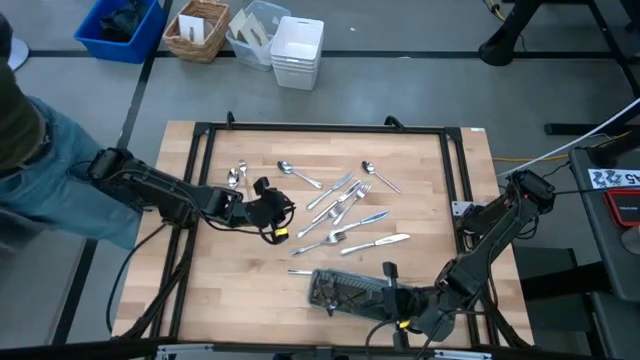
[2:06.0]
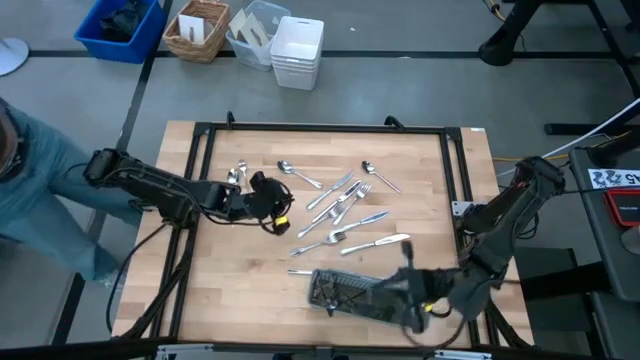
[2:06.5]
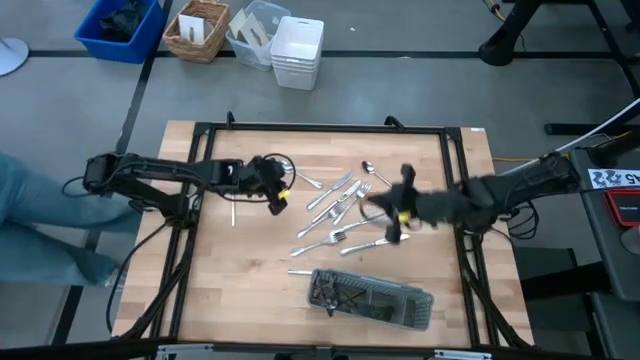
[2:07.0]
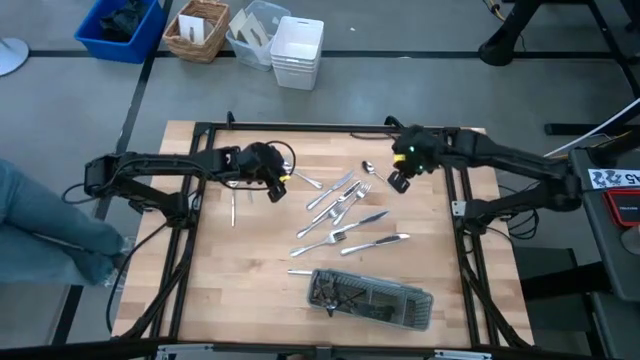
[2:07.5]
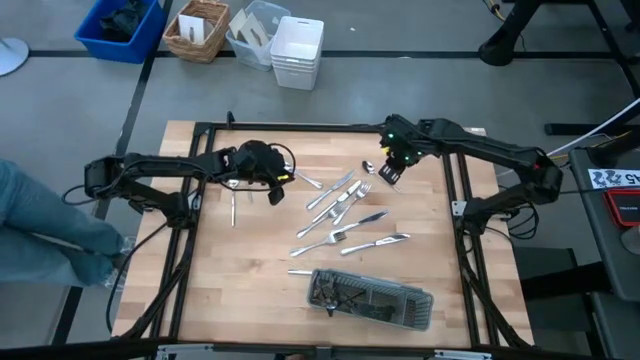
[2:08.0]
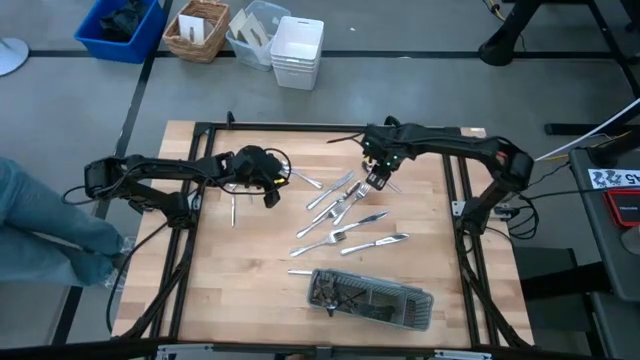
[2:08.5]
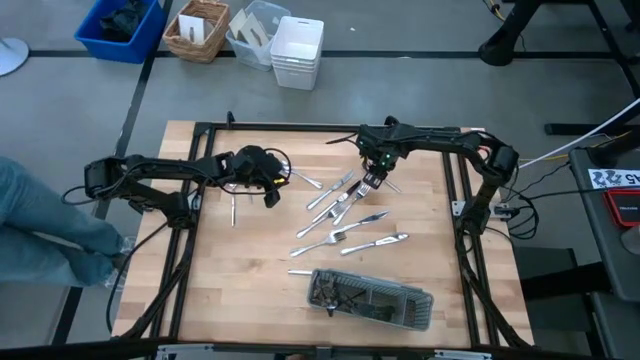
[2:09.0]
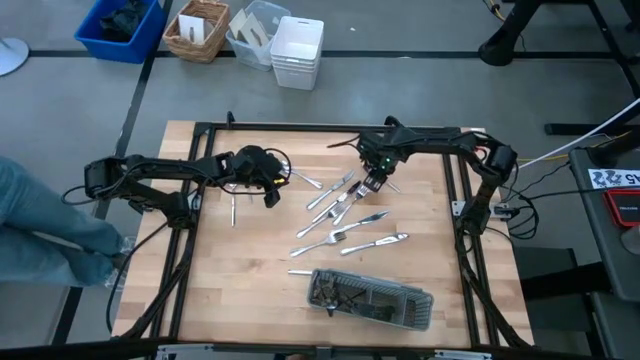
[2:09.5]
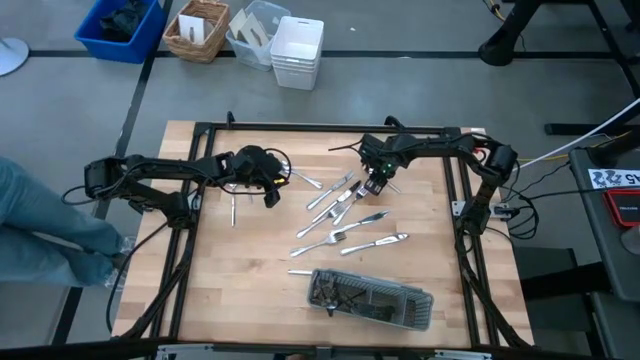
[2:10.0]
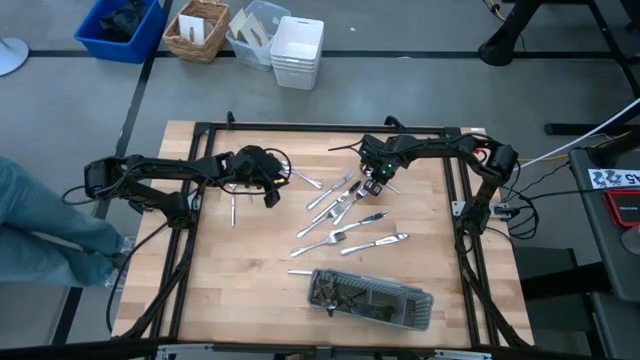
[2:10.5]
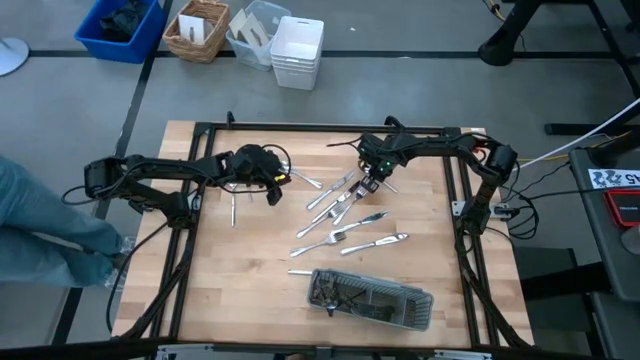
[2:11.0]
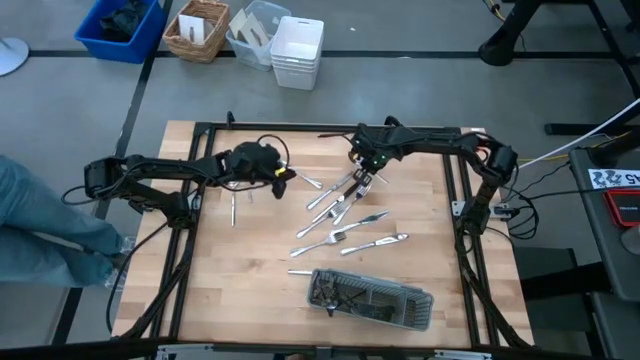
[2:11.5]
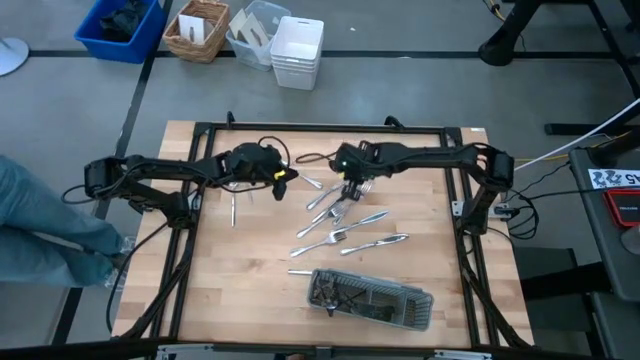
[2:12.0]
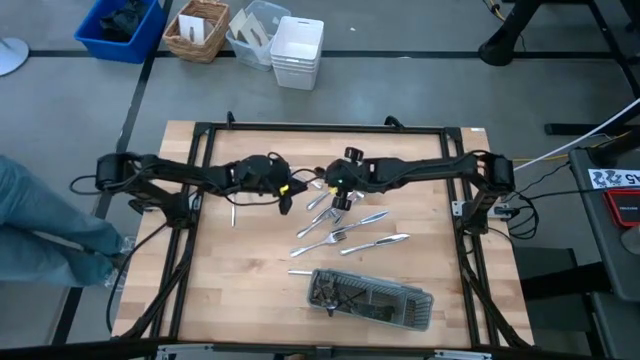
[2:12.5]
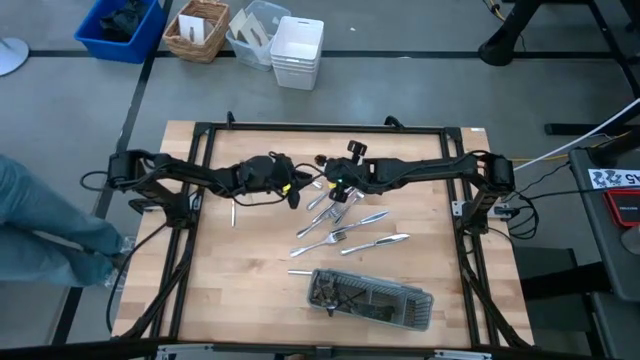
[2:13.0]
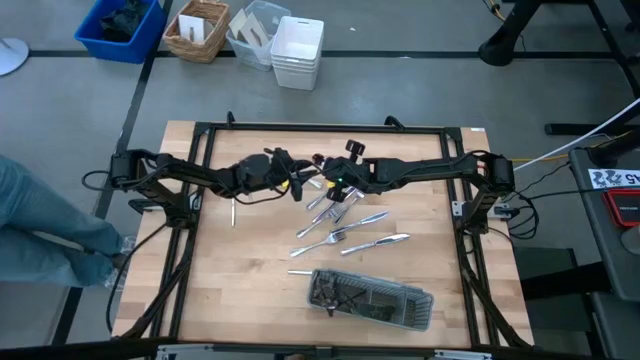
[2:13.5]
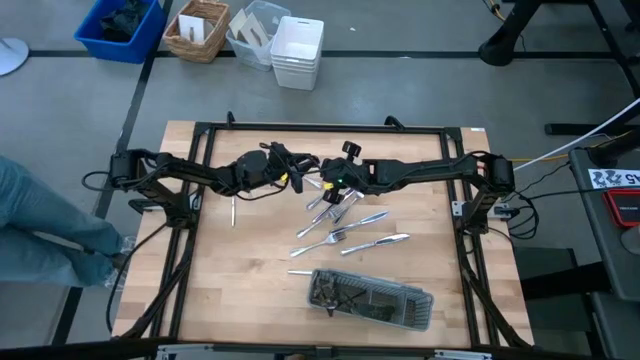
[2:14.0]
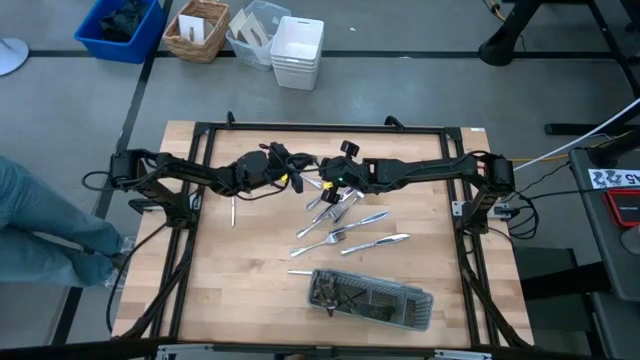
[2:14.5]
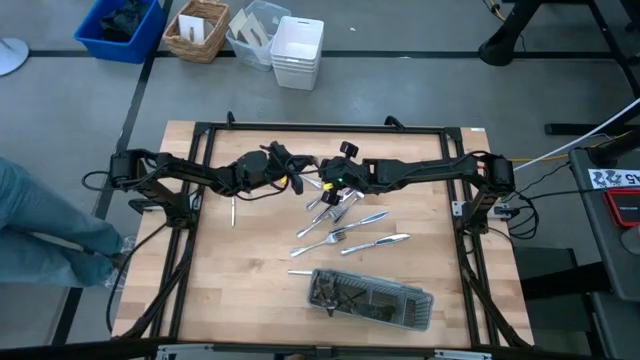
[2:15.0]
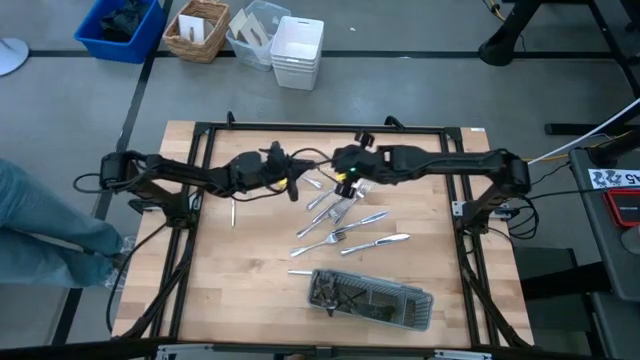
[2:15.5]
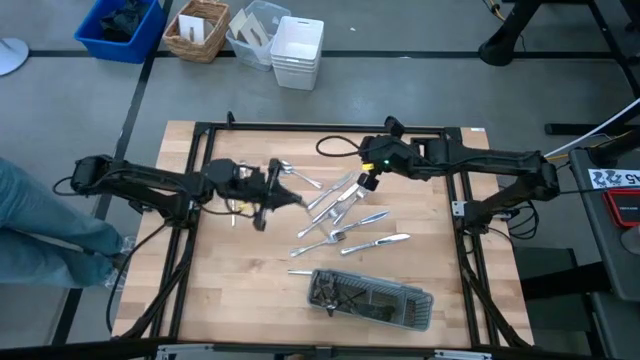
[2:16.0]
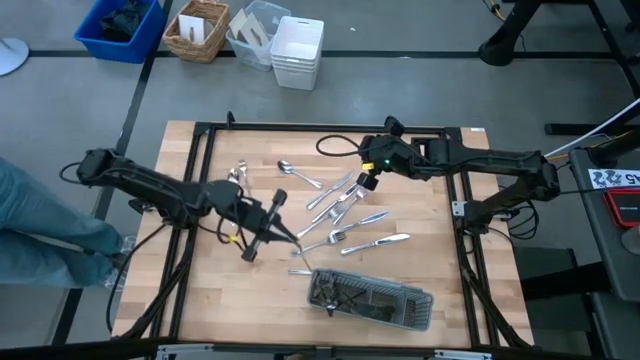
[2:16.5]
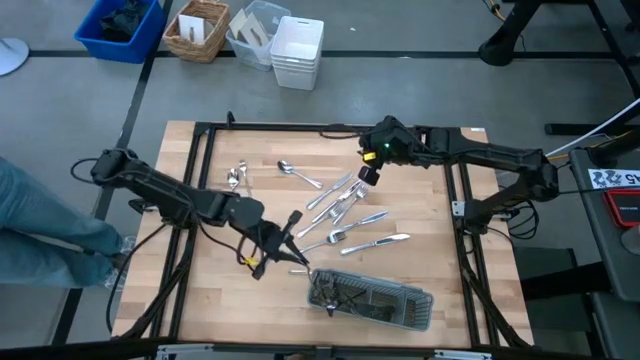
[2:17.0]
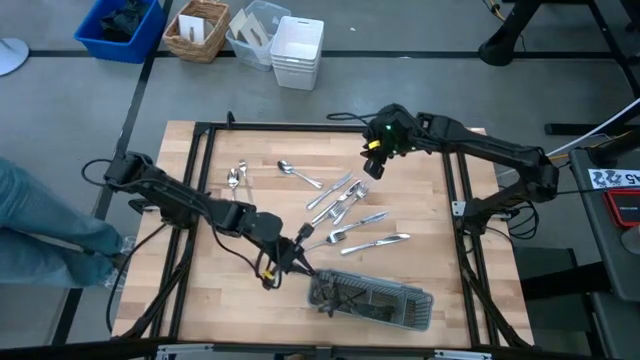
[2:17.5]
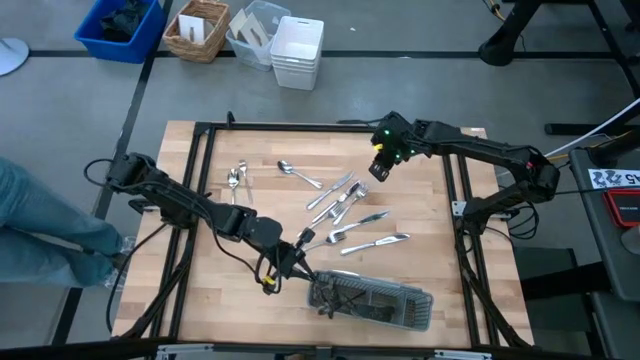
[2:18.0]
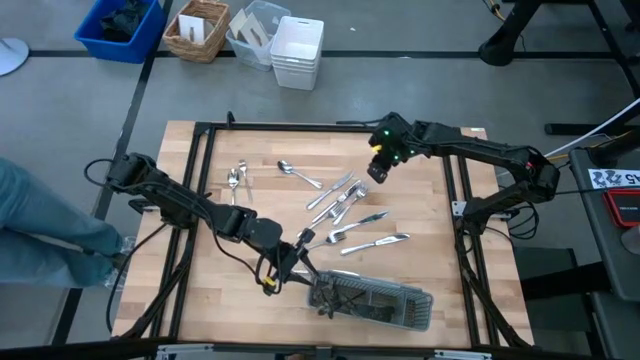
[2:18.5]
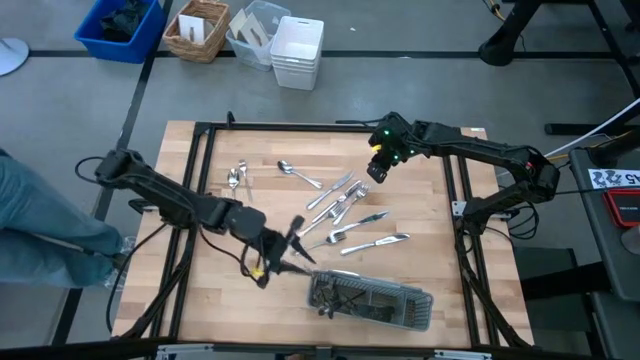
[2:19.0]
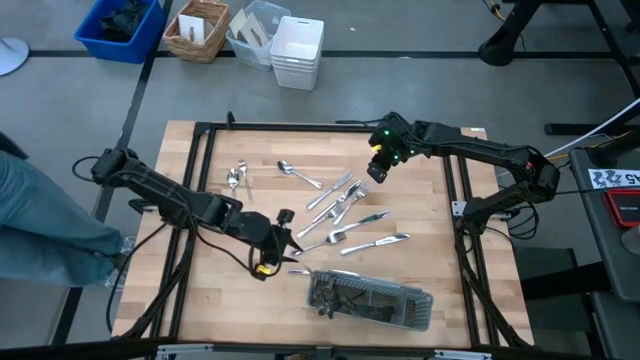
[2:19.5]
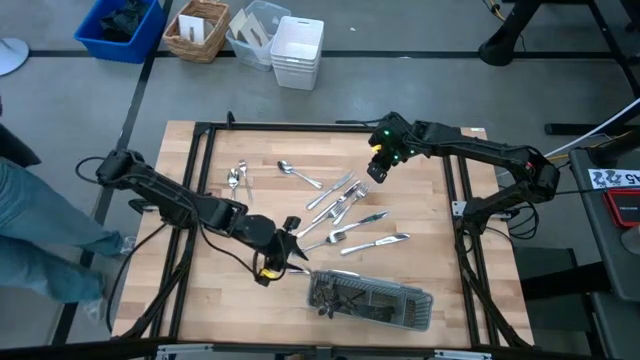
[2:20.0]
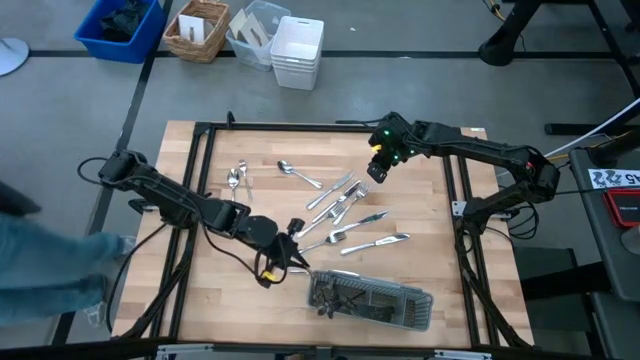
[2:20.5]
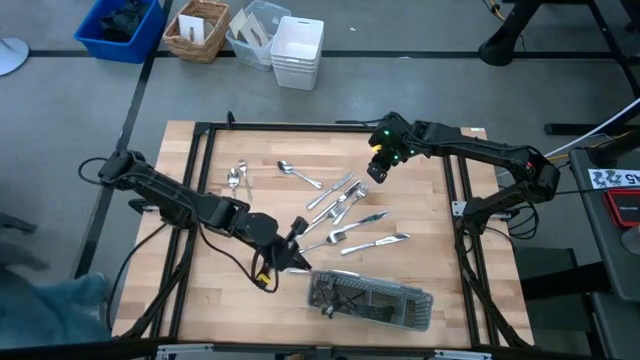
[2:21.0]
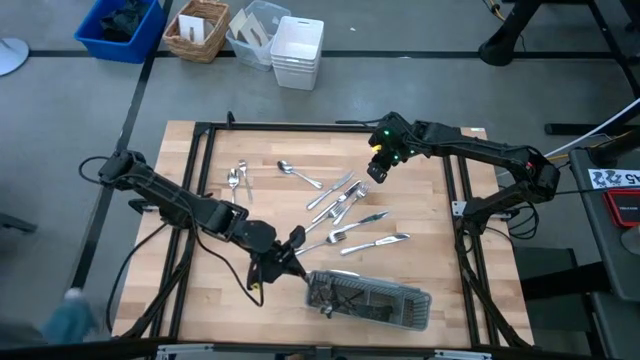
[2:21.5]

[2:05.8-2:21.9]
Task: Sort silverware
Put the spoon into the gray silverware rack

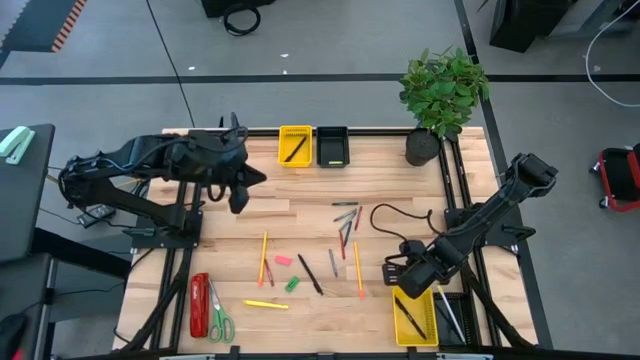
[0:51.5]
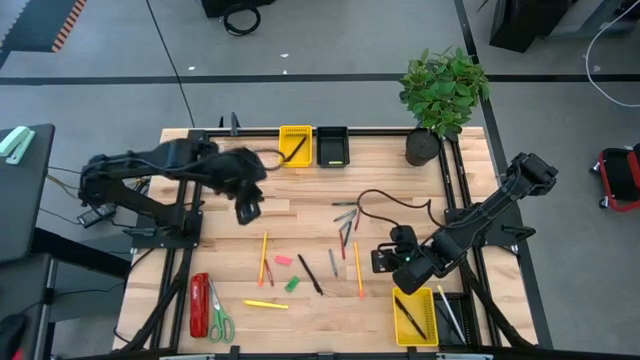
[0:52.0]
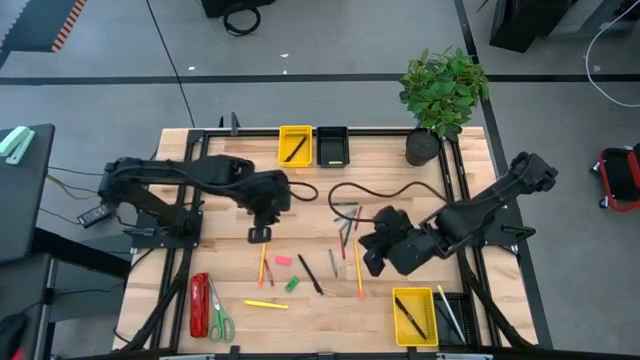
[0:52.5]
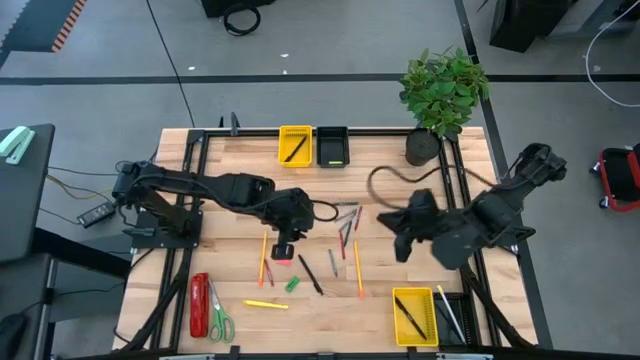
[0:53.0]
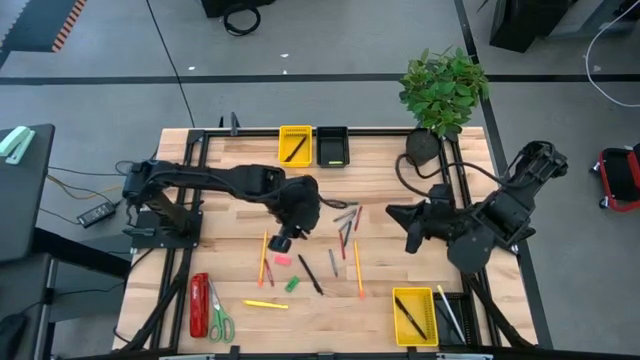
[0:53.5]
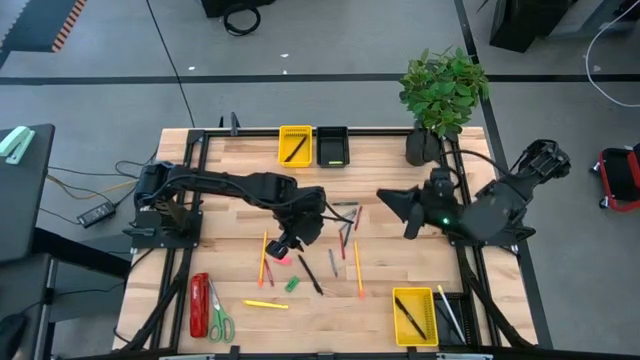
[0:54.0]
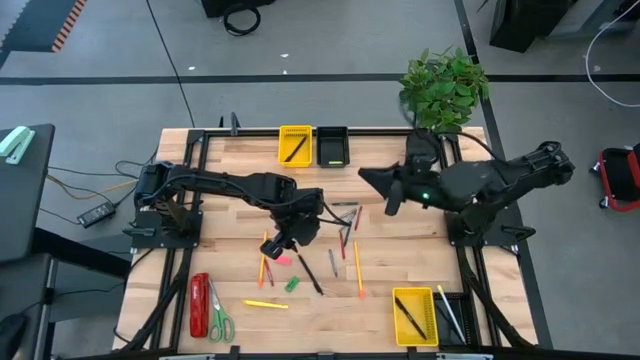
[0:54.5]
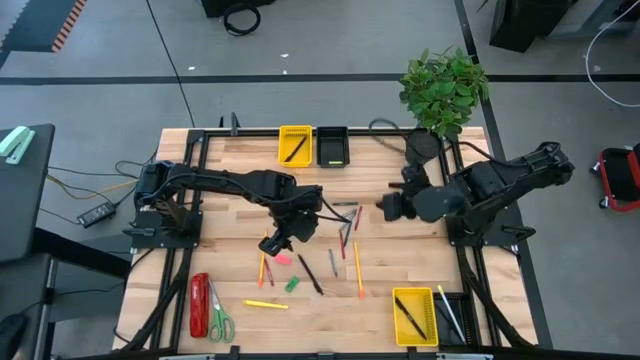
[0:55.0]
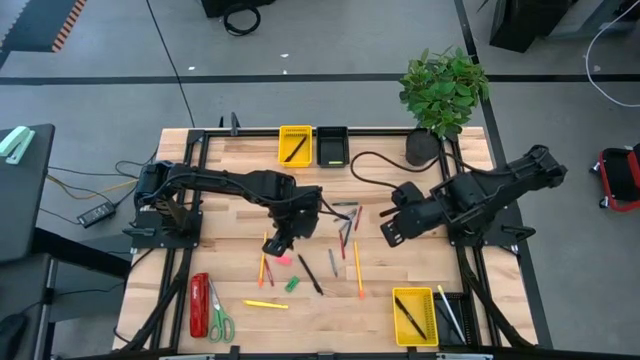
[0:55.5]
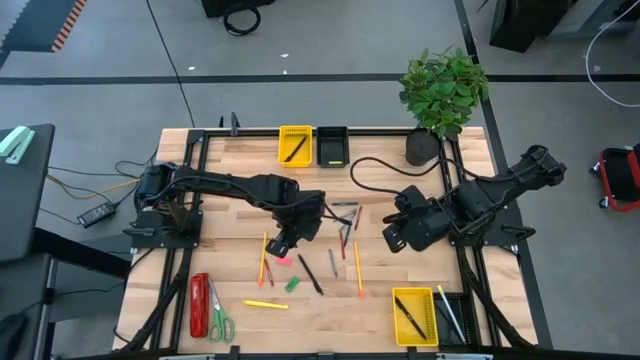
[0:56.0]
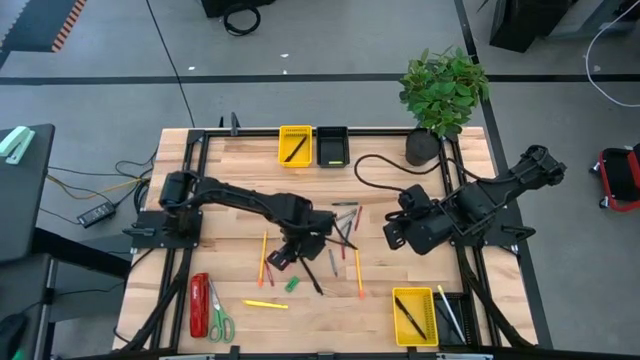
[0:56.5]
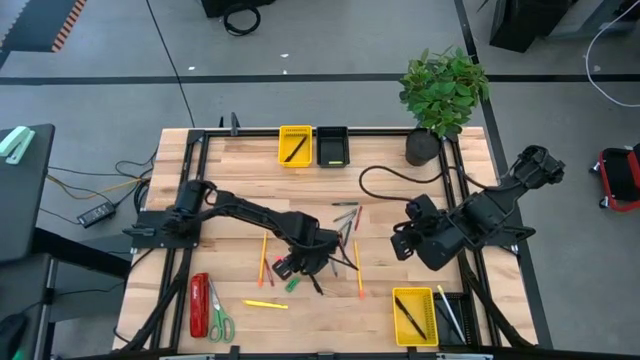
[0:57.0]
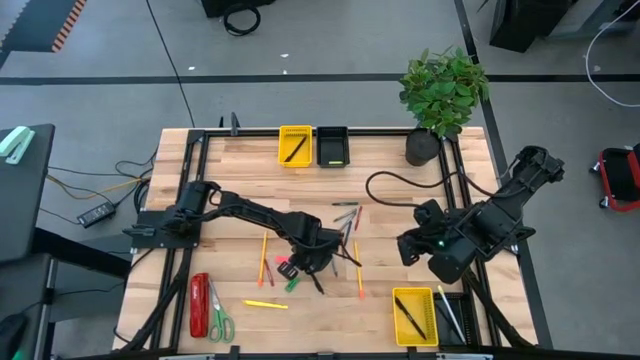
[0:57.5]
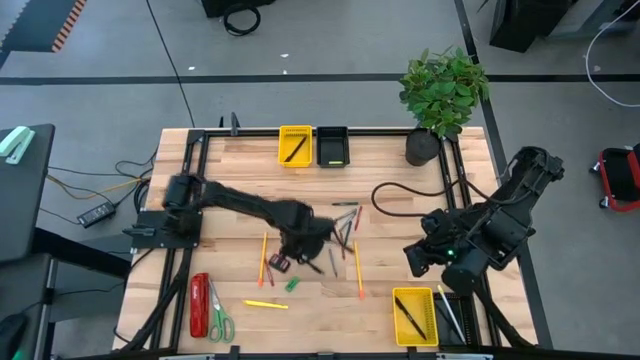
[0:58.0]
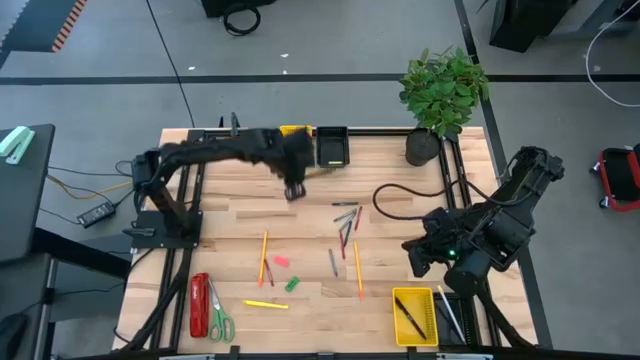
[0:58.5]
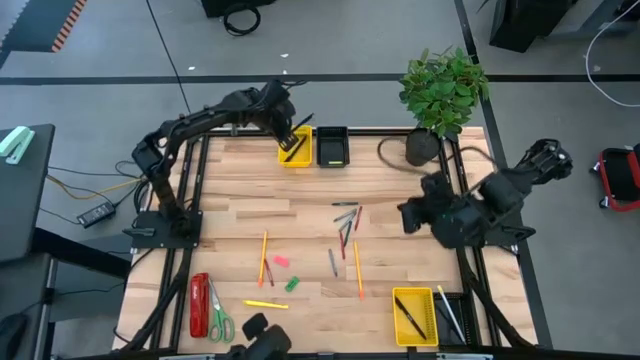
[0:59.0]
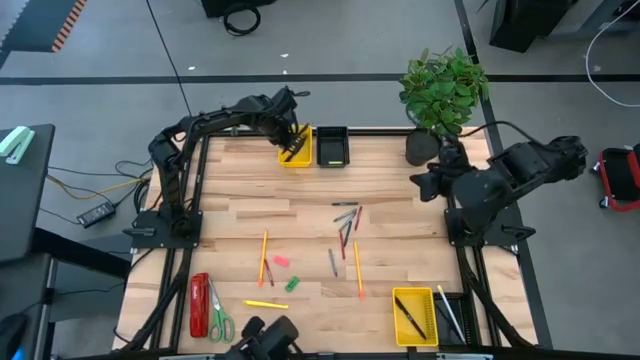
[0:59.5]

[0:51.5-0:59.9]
Task: Sort crayons/erasers/pens/pencils in bins
Put the black pen into the top yellow bin
